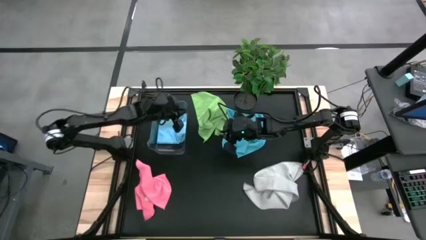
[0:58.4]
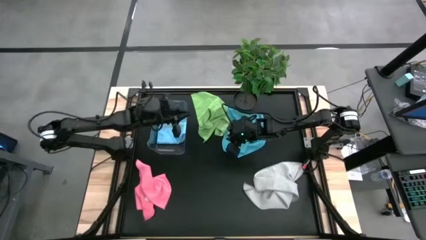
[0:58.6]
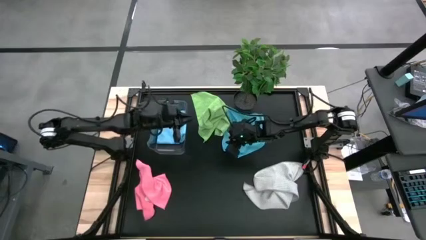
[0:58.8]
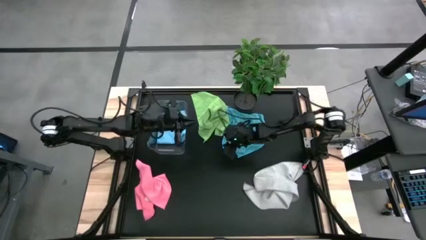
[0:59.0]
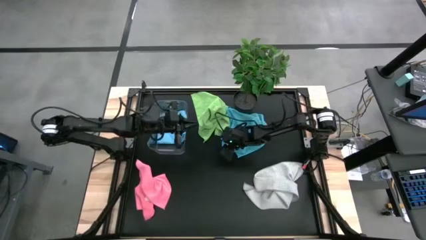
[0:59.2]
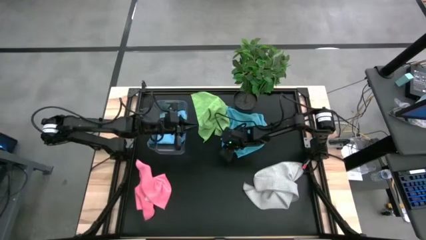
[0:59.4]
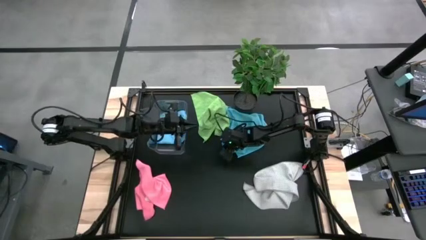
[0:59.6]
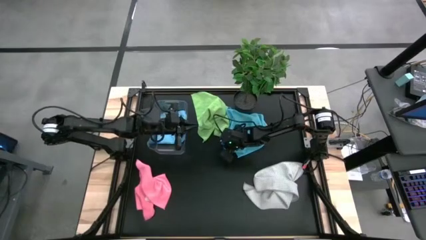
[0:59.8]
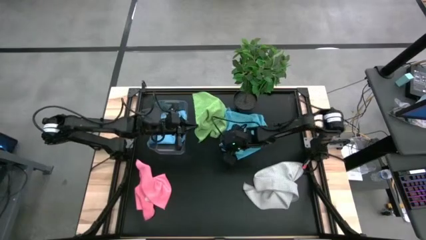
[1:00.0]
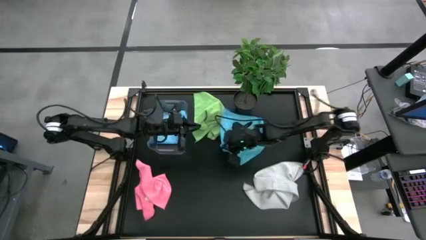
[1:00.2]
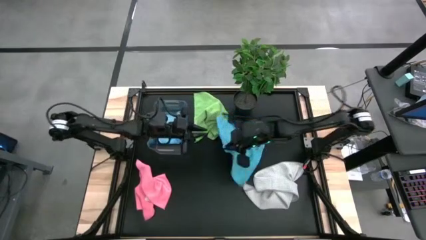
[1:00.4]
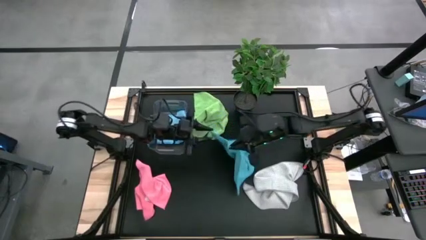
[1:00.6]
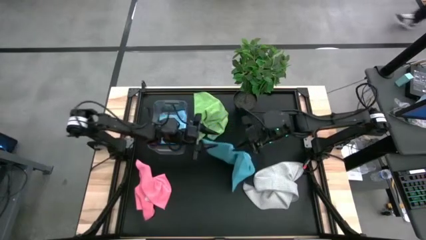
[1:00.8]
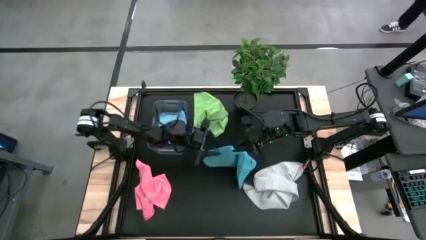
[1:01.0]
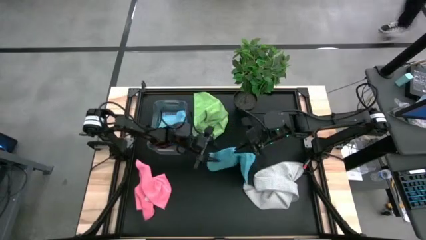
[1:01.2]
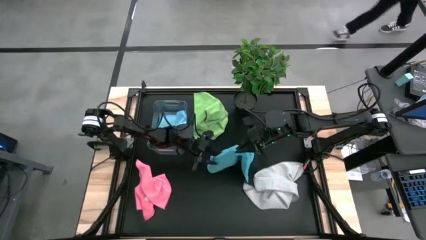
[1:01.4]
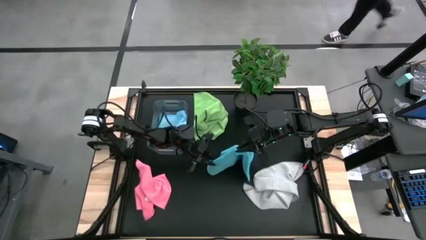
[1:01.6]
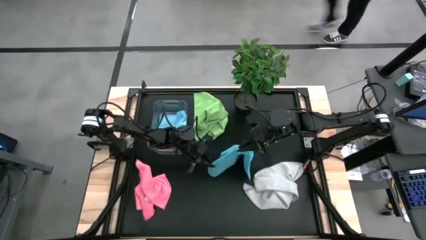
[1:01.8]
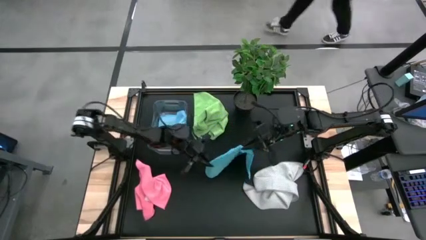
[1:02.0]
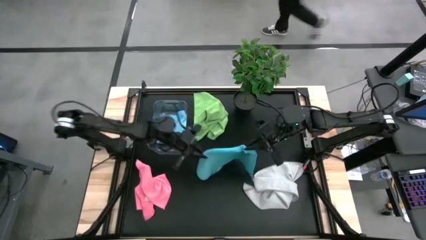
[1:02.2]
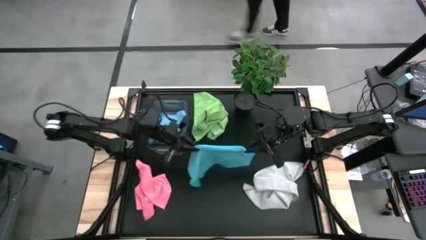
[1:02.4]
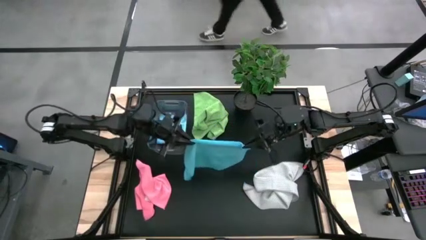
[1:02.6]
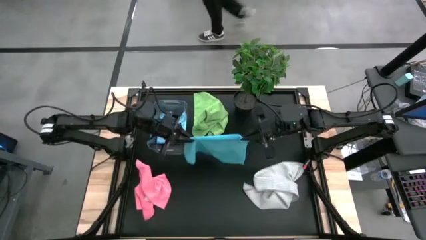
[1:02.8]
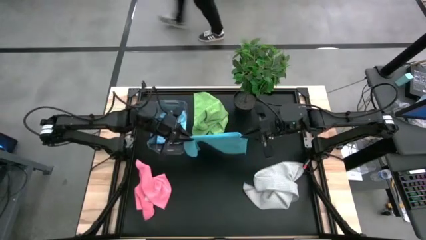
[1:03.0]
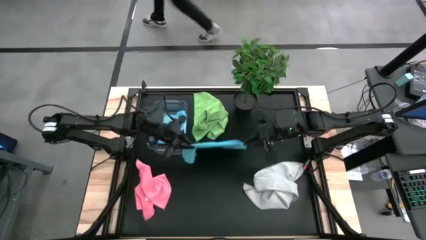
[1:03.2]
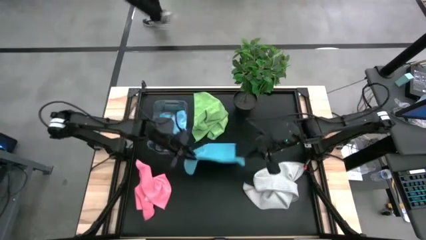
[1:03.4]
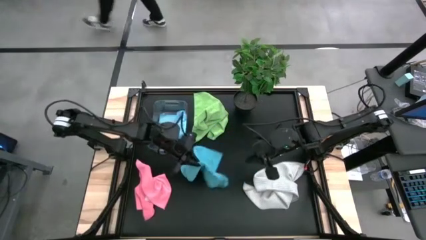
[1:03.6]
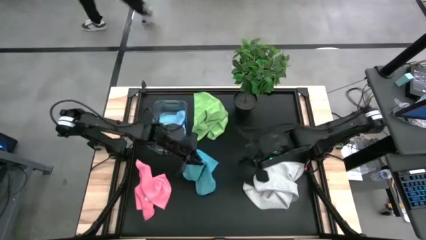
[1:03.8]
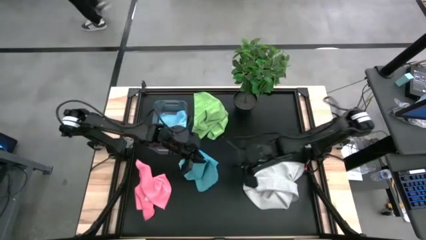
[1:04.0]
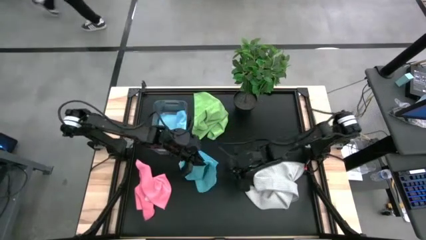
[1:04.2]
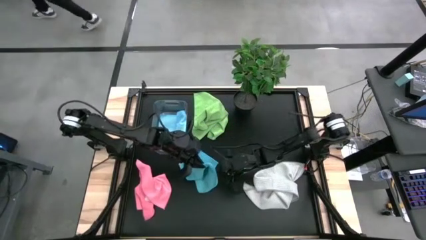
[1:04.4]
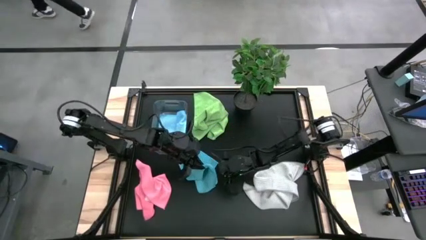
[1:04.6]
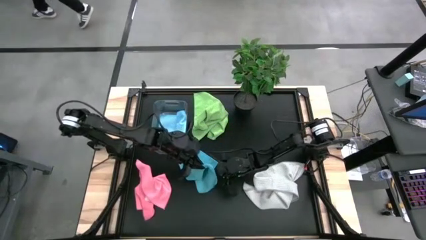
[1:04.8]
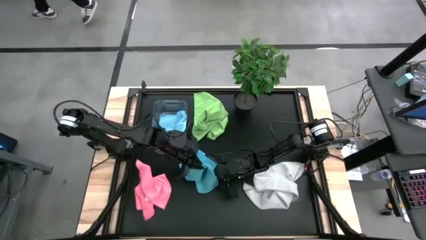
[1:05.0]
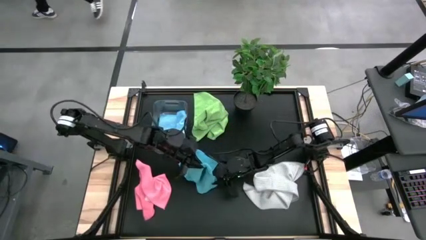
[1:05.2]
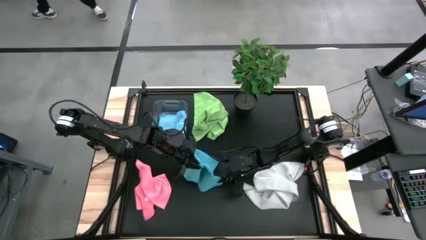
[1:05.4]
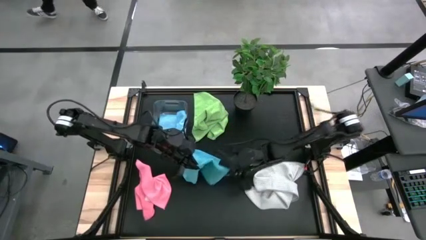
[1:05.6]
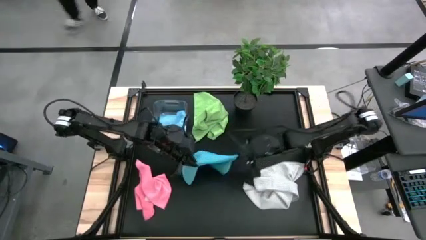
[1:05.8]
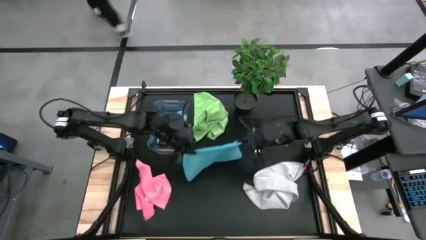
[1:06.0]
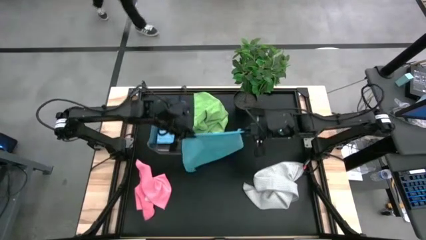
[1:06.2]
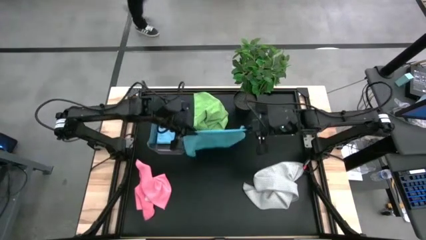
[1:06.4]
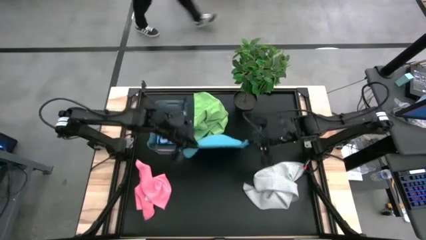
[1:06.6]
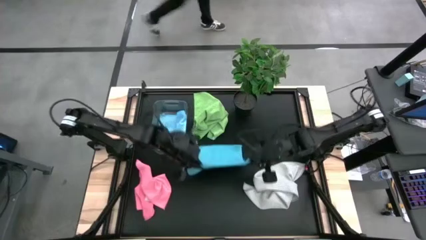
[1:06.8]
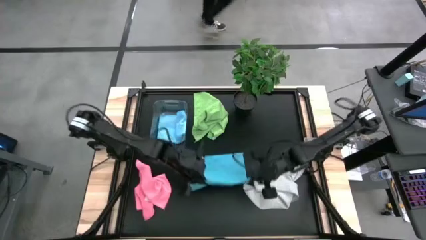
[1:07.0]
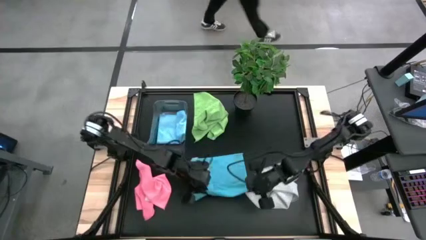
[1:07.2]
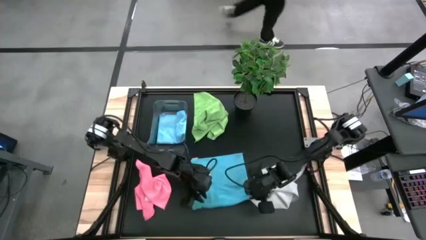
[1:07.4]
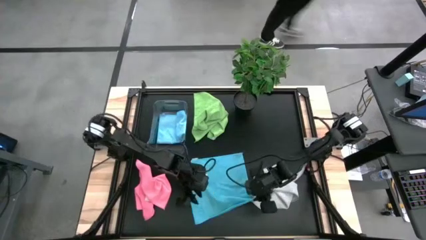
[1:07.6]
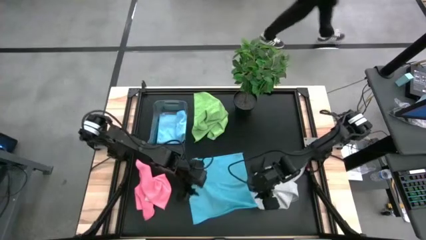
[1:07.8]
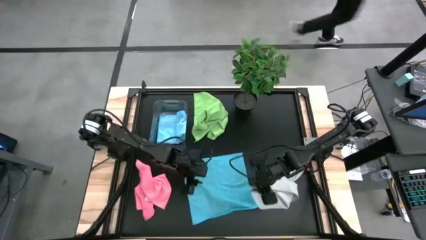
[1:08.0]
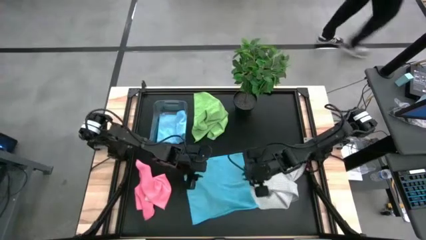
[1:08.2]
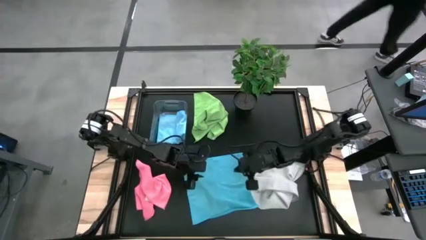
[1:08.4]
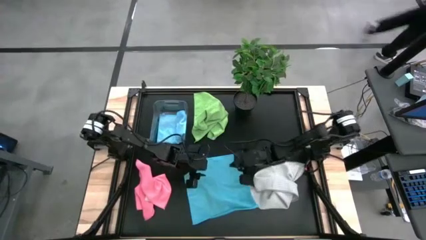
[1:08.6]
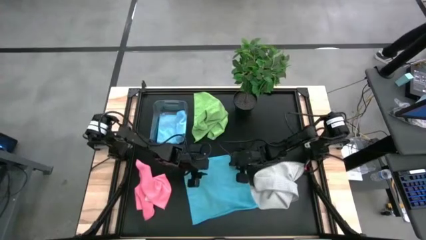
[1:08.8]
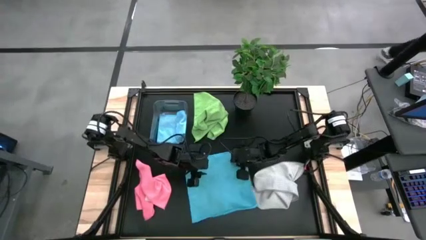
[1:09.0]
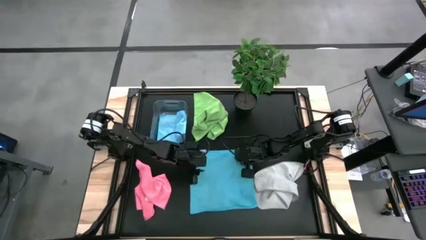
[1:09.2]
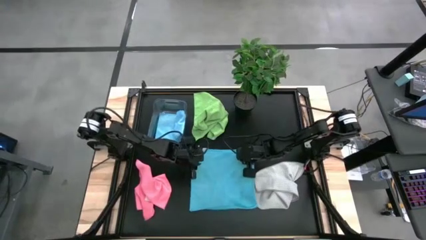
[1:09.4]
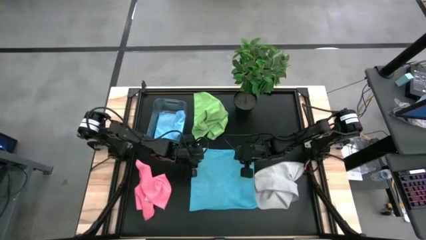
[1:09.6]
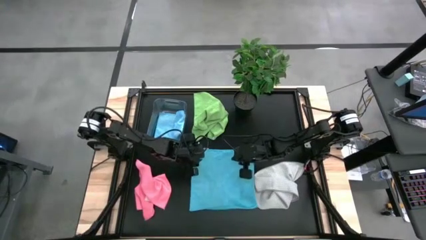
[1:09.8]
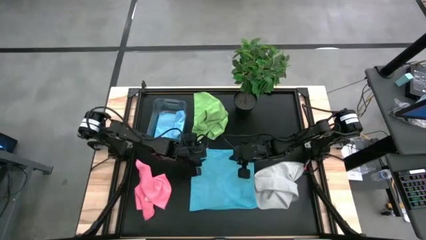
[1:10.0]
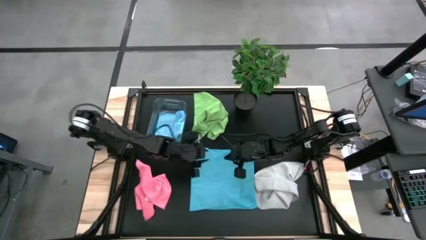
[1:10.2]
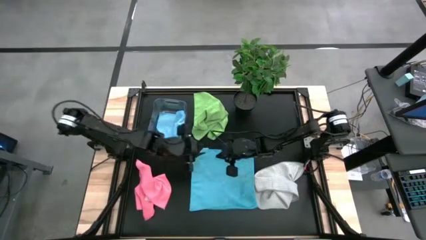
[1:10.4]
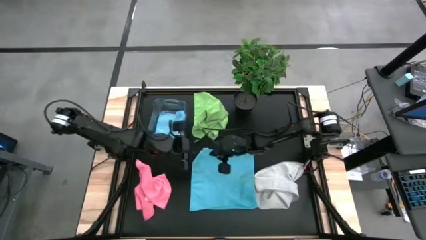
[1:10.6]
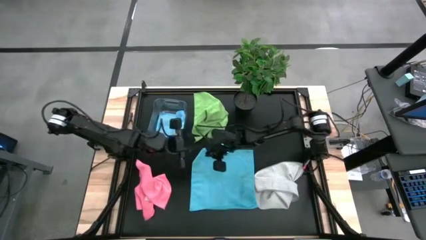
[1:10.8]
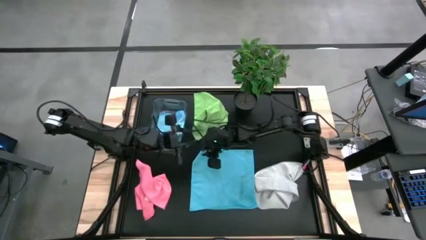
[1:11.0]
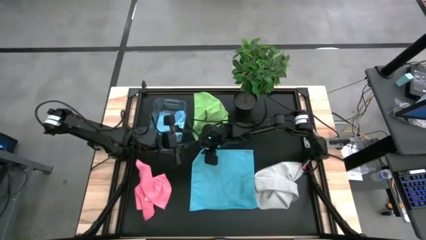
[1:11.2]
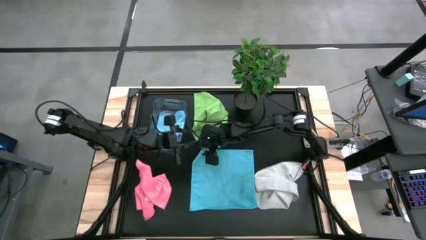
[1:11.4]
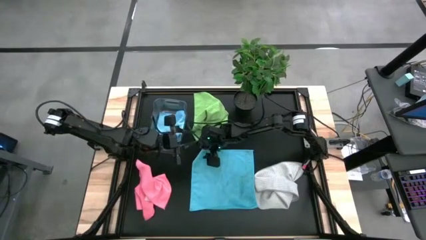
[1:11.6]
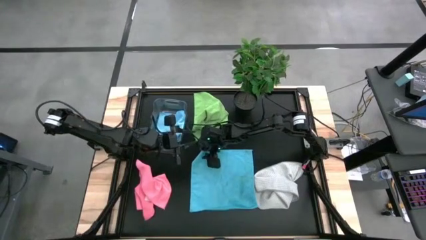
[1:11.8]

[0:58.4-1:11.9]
Task: Fold microfiber towels
Fold the blue microfiber towel

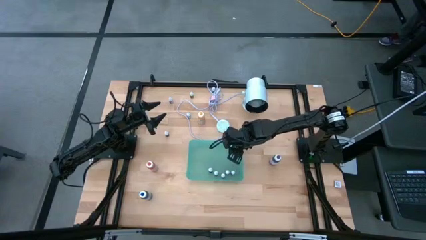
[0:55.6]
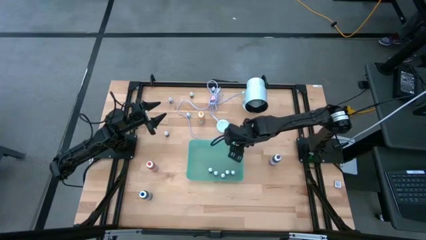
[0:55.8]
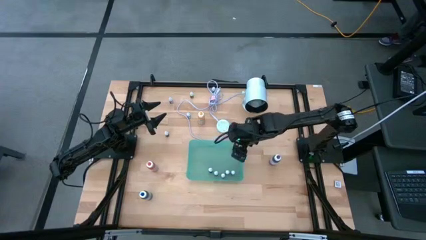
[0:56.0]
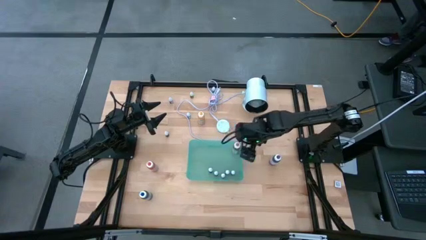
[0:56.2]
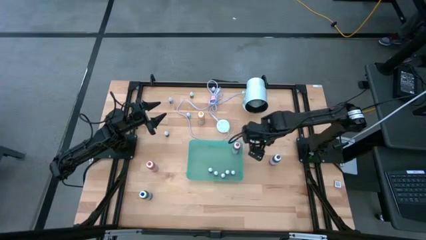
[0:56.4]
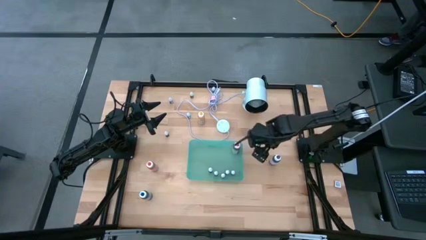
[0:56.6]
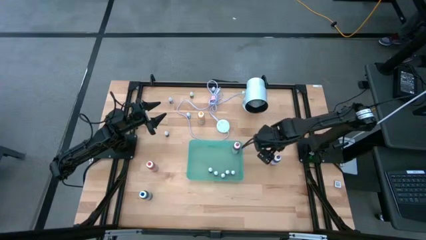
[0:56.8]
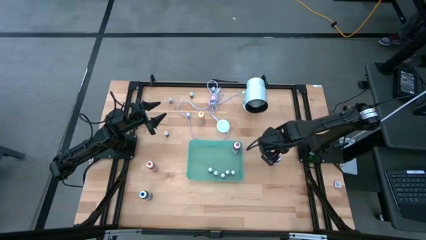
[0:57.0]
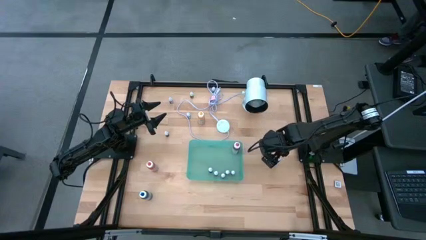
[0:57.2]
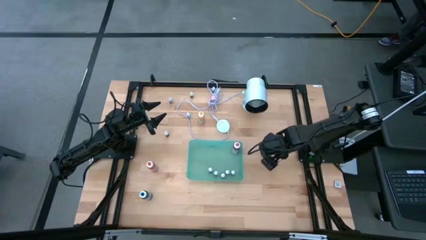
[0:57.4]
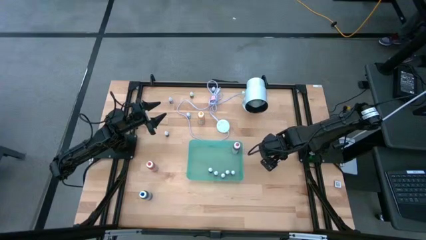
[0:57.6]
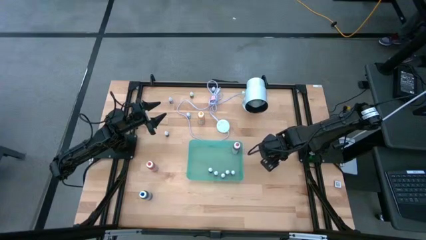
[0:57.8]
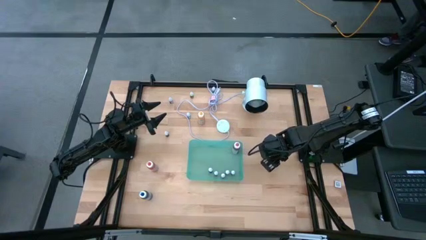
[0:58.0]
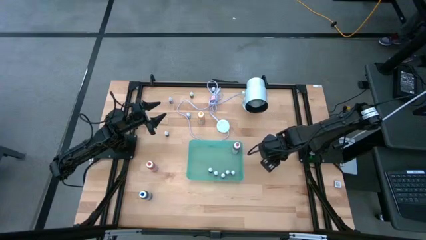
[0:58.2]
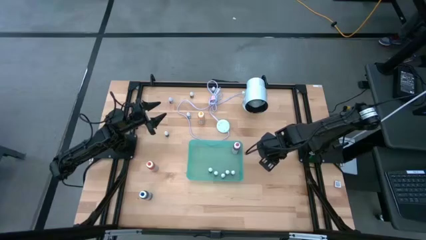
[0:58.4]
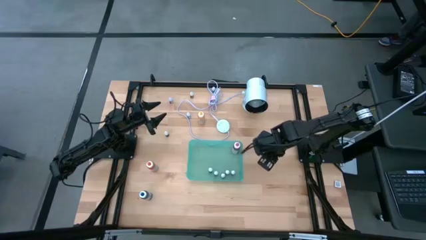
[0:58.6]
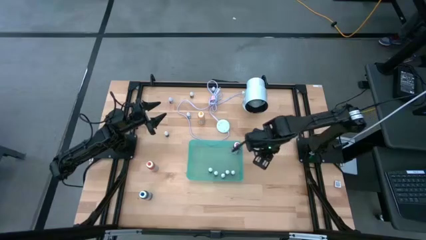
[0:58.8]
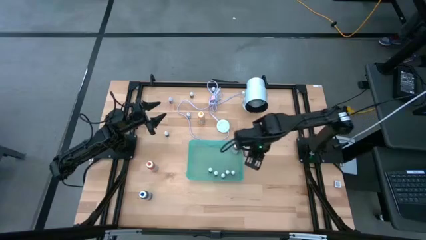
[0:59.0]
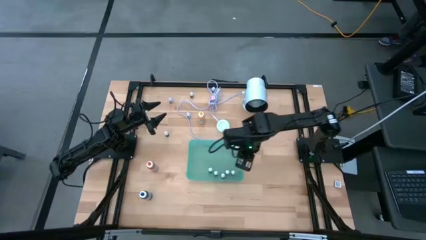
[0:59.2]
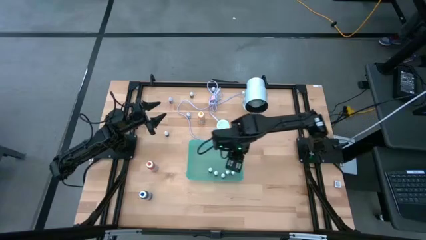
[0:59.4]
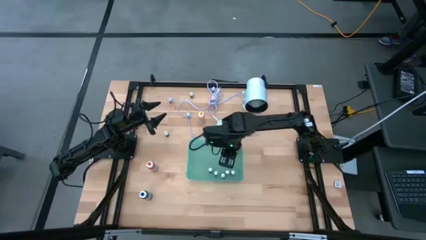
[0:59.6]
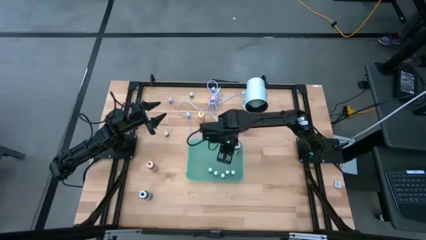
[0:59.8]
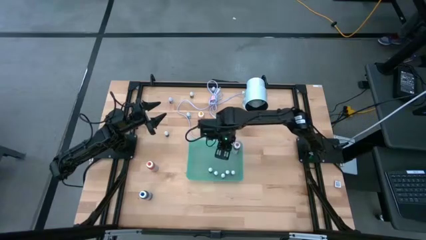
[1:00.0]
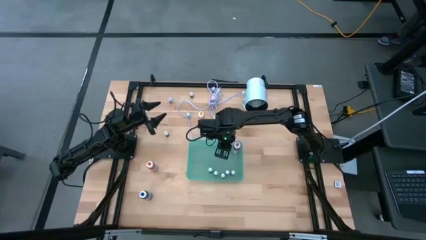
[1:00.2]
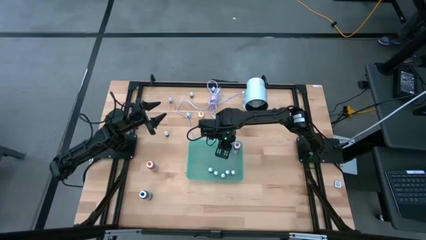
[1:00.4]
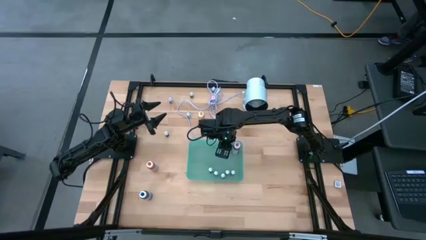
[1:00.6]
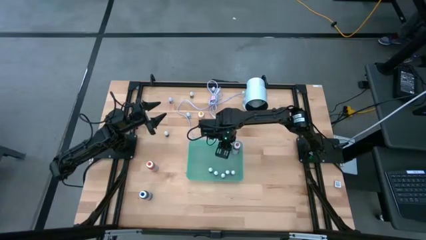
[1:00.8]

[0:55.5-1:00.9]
Task: Pick & Place food coloring
Put the big purple food coloring bottle into the bin
